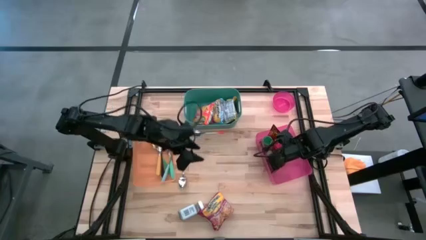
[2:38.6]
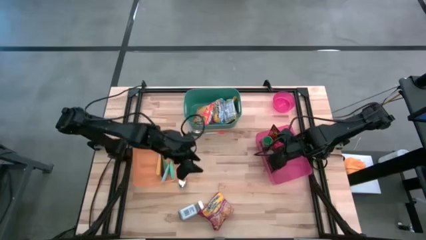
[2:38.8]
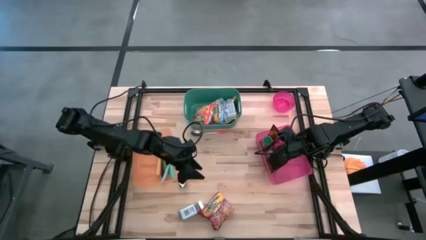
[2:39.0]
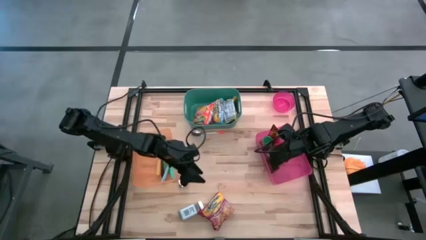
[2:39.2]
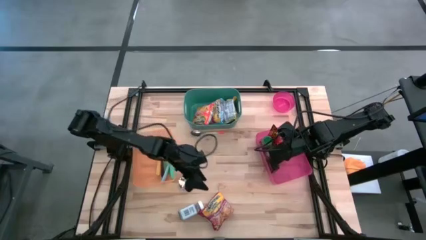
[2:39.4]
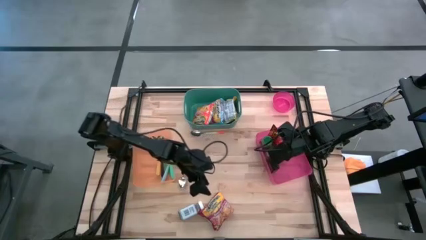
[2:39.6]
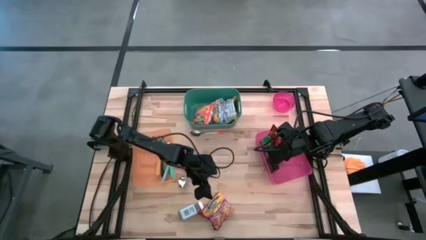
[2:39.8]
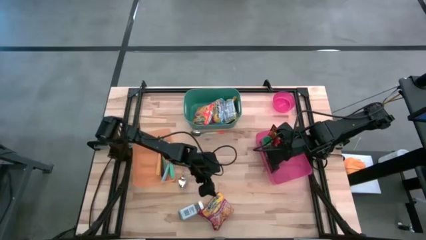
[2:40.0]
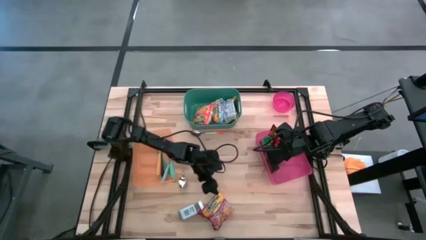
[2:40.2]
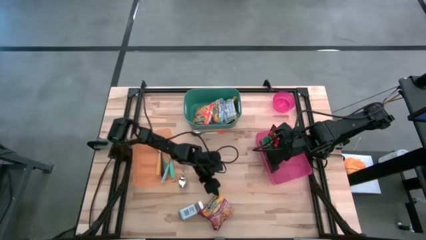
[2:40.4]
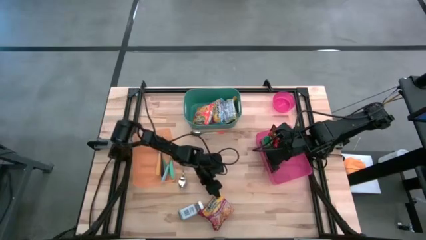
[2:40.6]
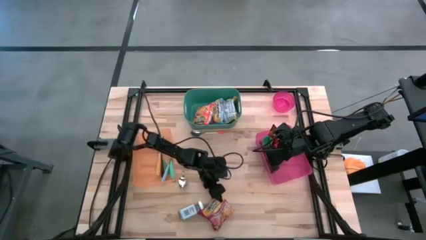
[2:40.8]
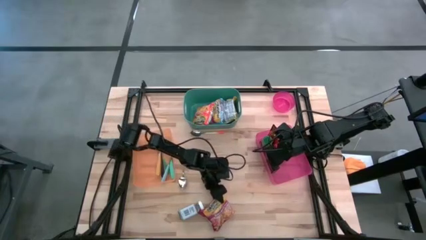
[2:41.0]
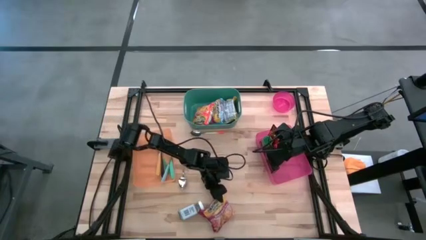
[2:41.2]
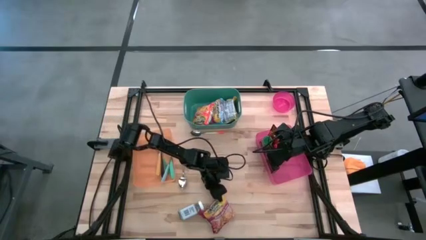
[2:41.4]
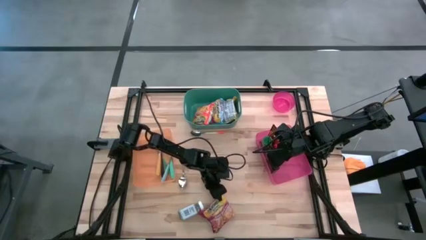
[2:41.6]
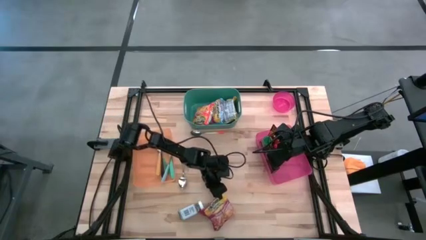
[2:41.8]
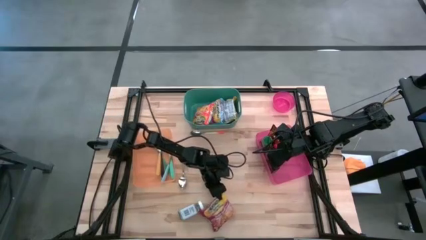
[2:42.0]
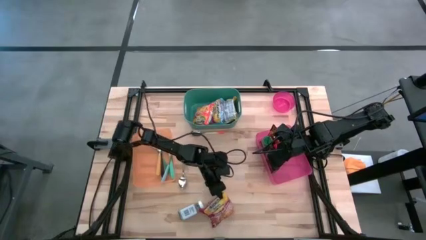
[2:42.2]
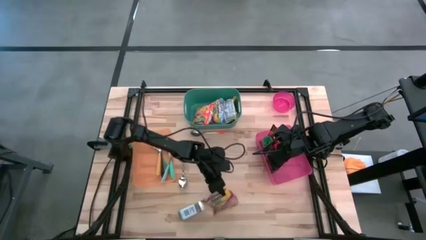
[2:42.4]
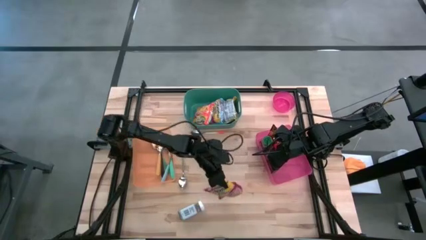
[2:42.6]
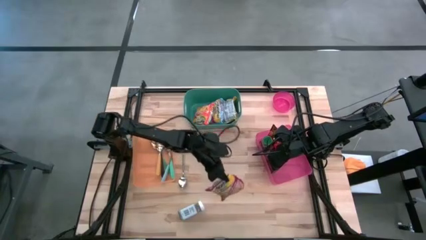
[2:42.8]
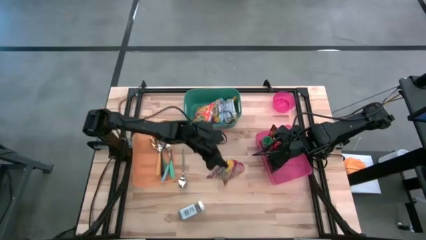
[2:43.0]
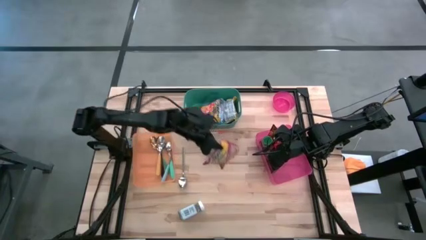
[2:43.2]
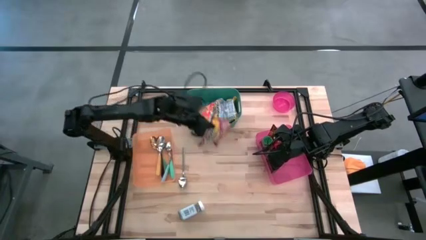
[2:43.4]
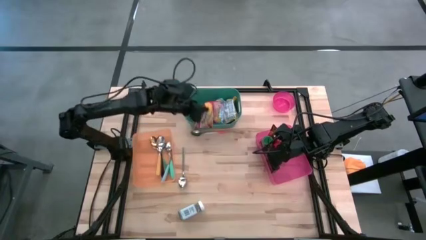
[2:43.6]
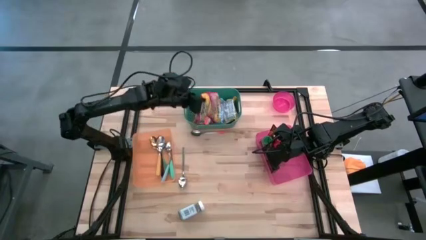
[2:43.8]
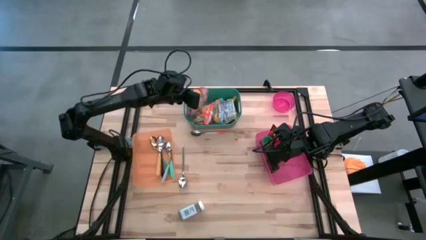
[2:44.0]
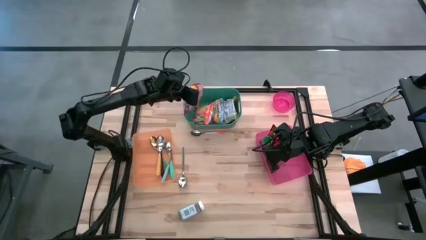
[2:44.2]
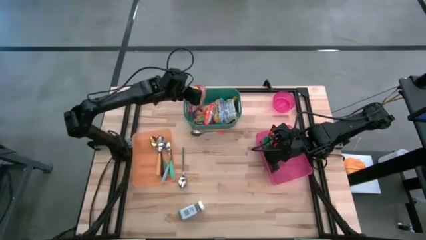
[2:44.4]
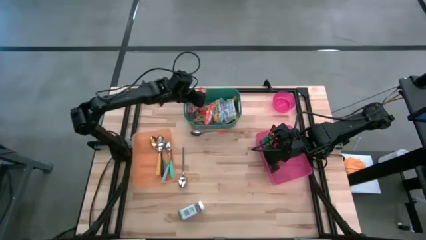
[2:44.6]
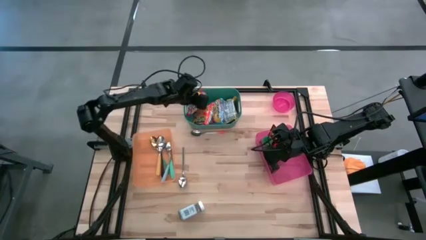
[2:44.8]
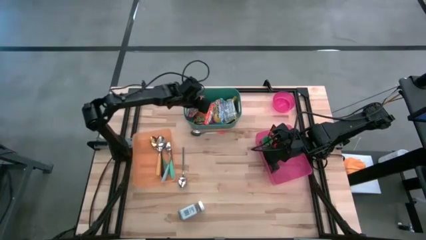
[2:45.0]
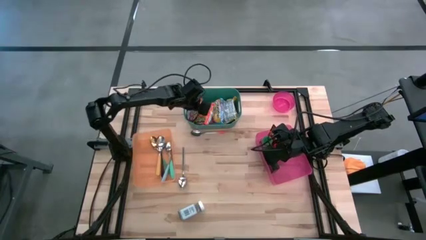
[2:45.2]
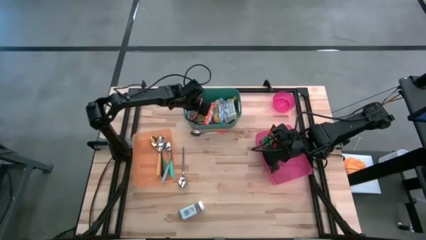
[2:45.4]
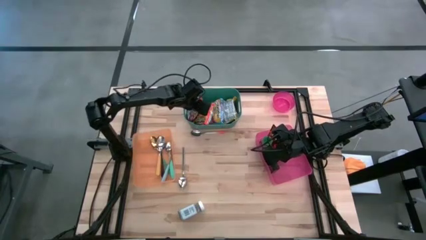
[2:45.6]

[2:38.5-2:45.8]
Put the red noodle pack into the green bin

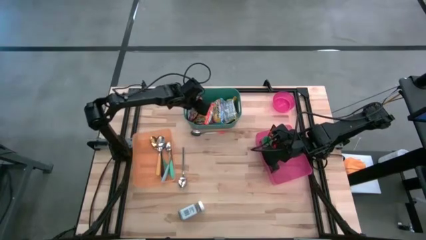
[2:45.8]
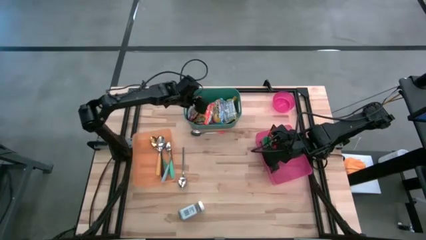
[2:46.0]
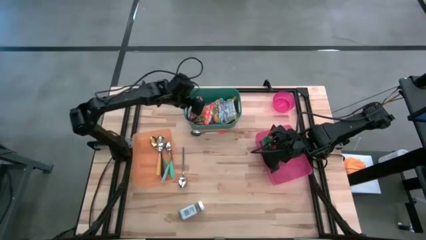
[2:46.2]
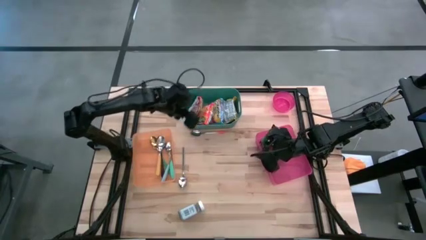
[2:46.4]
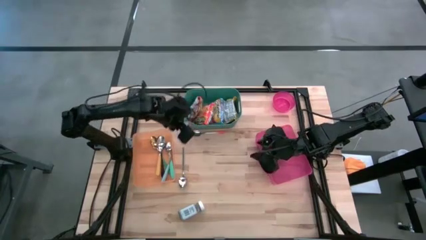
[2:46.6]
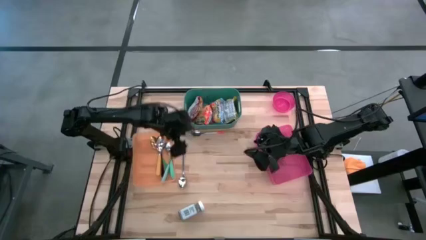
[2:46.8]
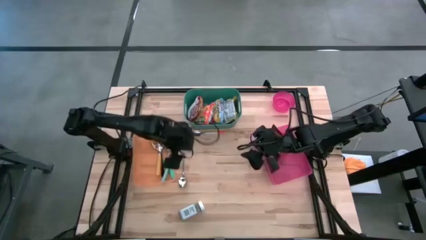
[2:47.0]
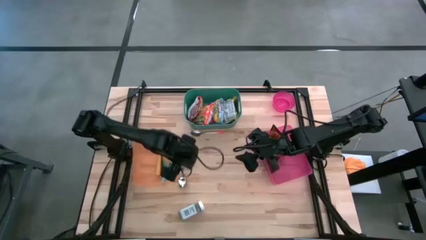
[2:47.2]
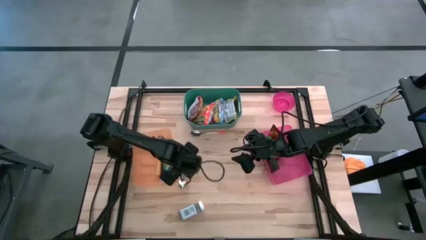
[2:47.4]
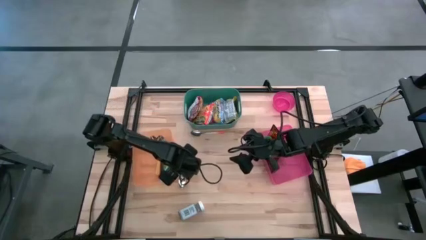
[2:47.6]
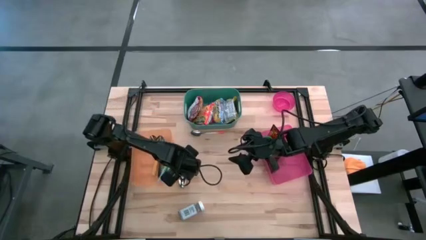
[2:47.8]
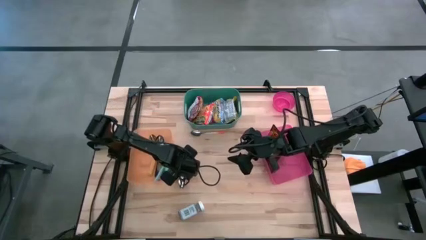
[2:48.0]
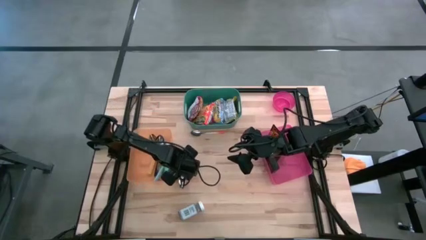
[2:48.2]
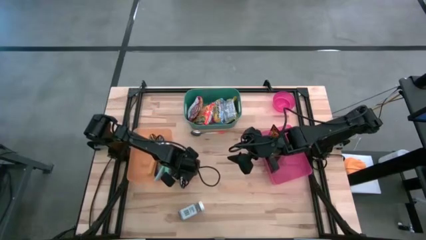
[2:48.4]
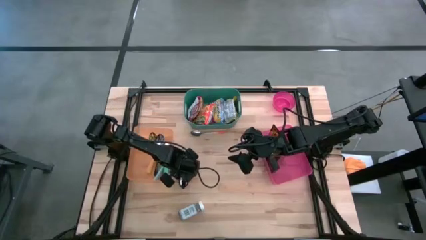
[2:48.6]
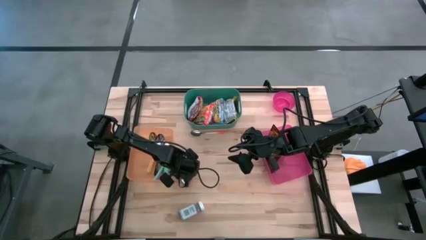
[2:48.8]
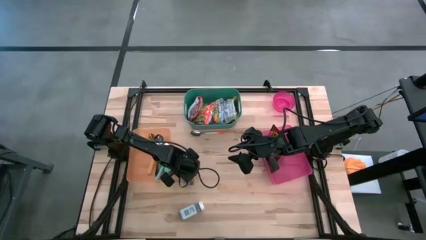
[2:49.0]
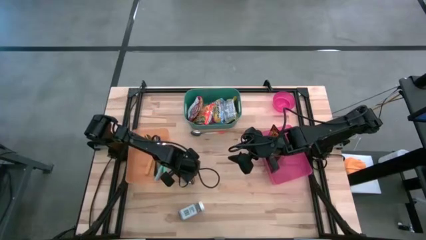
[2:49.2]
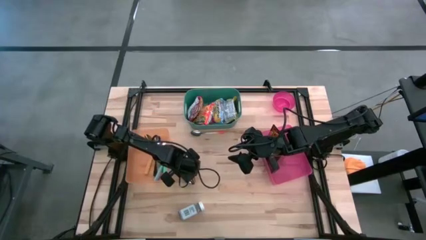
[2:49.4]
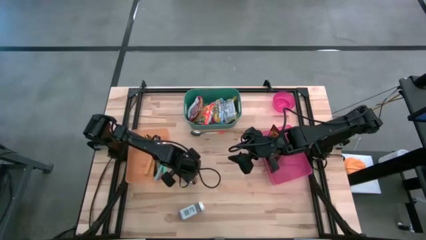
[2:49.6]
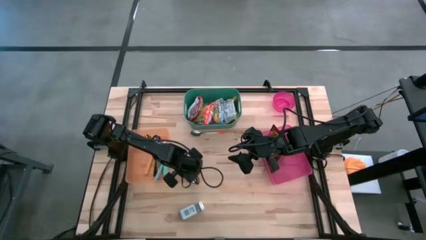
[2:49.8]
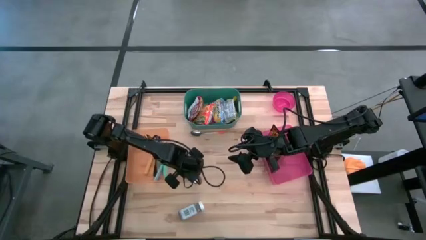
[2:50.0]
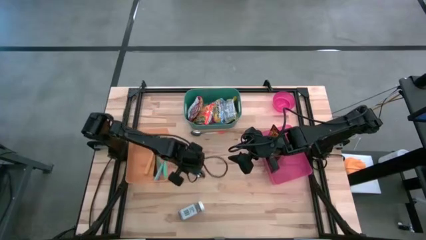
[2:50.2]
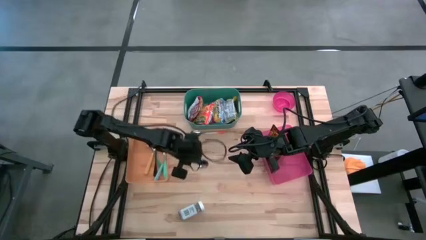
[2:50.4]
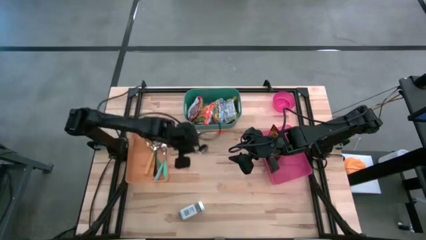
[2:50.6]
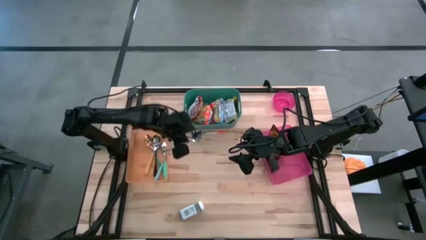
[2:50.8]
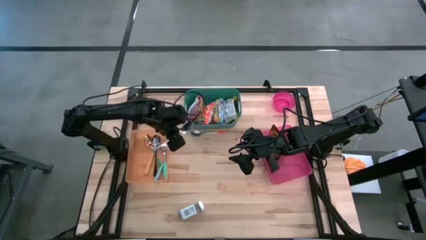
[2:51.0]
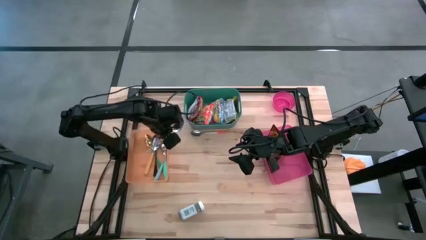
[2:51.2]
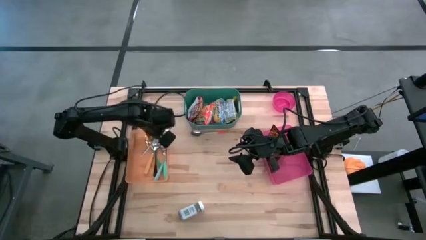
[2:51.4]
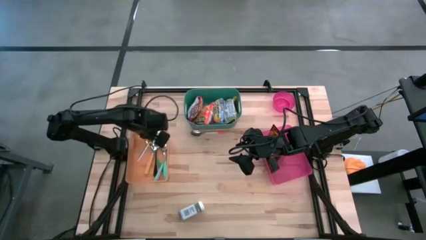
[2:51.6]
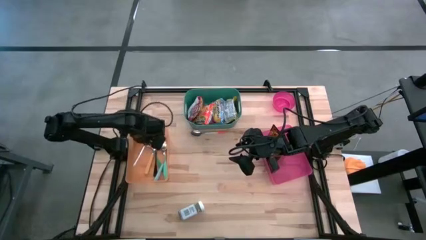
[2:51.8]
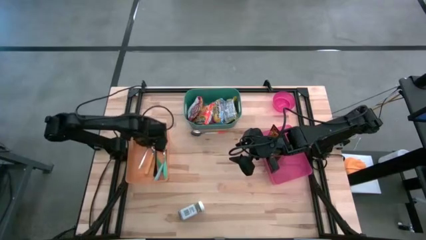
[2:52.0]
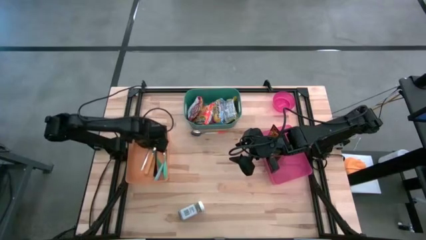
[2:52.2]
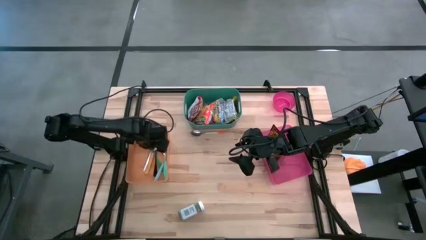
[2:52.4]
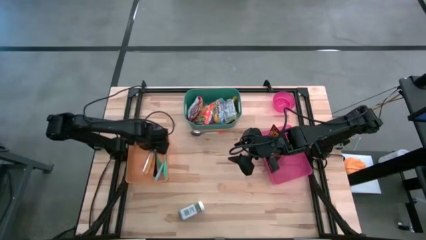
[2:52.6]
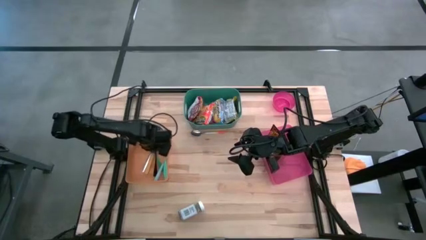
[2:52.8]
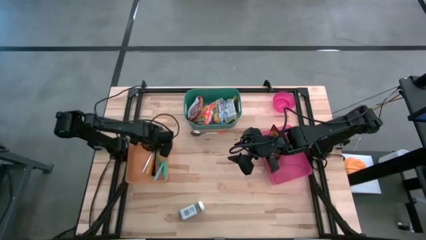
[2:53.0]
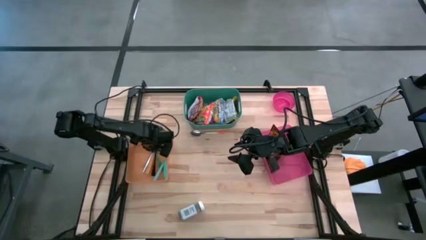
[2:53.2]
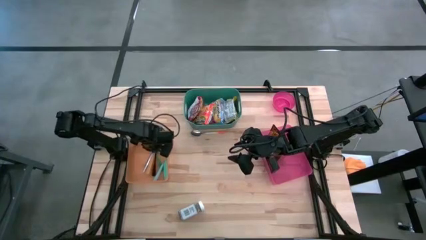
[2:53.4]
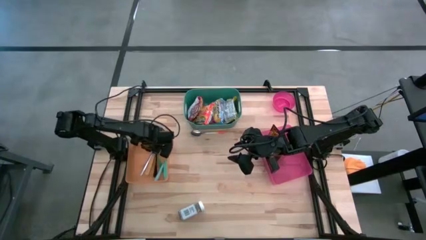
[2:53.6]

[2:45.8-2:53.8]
Put the silver spoon into the orange bin
